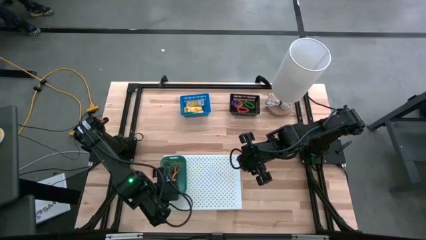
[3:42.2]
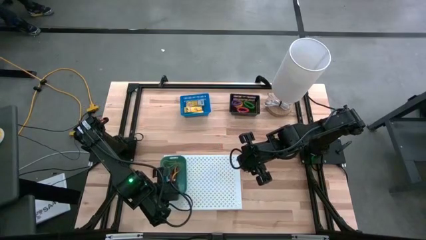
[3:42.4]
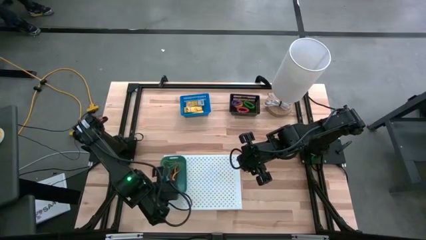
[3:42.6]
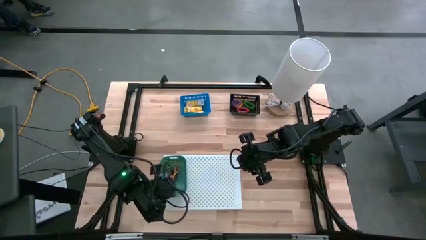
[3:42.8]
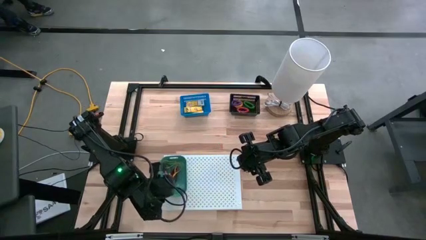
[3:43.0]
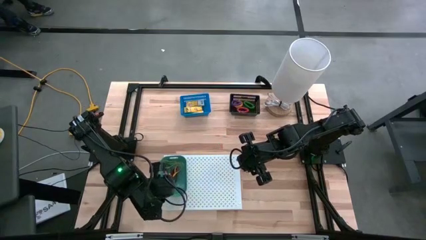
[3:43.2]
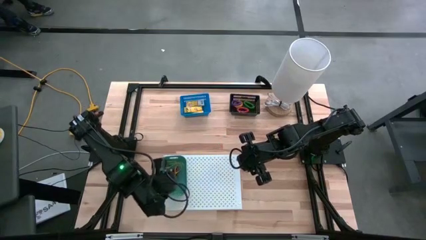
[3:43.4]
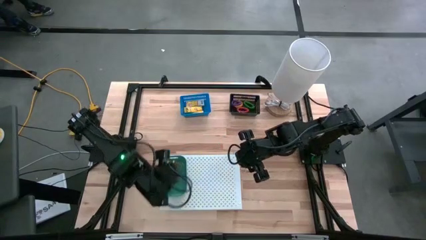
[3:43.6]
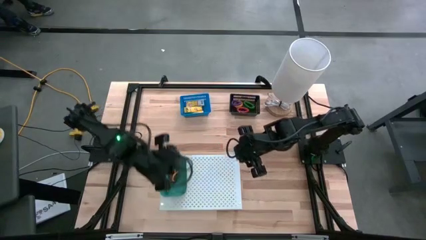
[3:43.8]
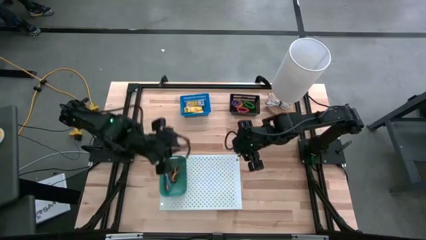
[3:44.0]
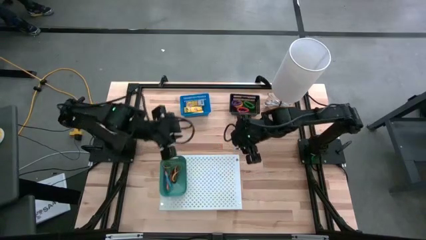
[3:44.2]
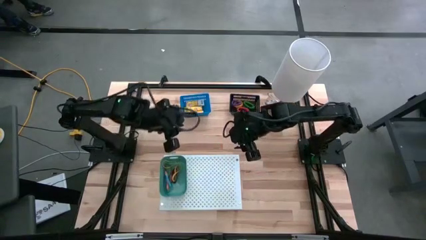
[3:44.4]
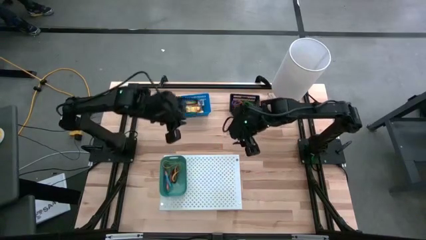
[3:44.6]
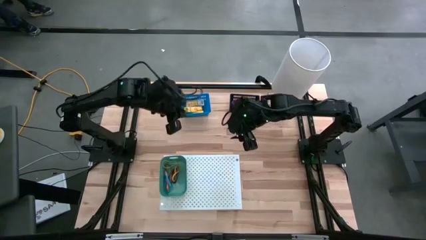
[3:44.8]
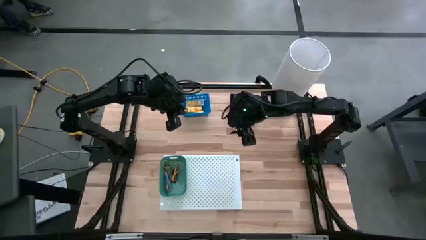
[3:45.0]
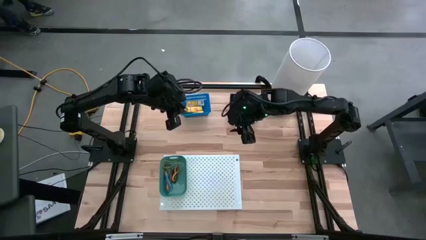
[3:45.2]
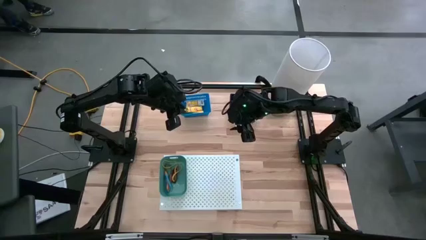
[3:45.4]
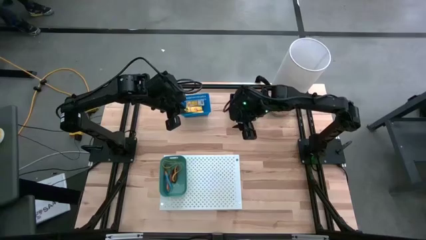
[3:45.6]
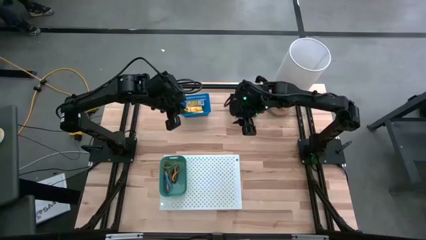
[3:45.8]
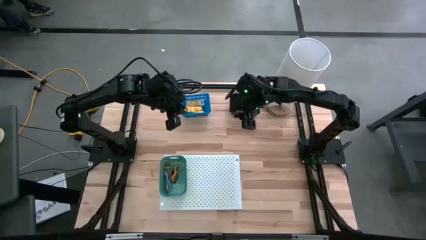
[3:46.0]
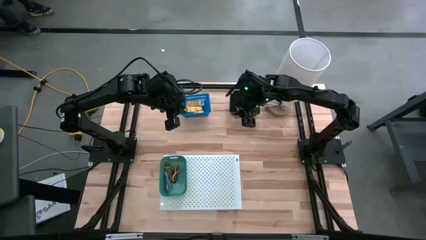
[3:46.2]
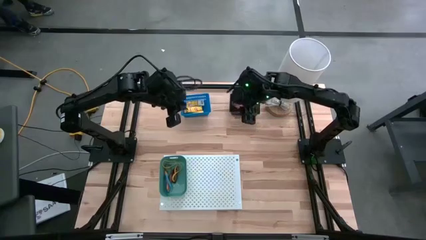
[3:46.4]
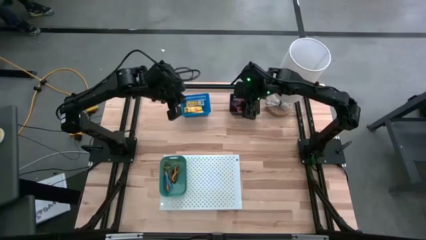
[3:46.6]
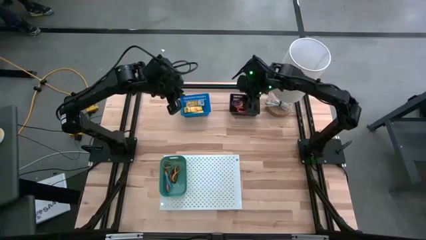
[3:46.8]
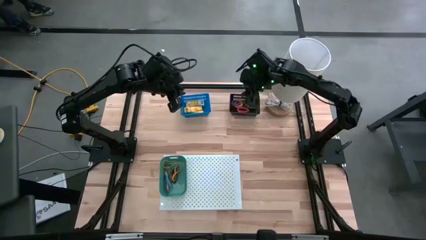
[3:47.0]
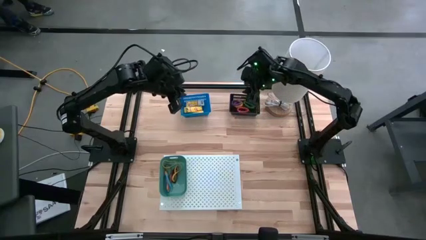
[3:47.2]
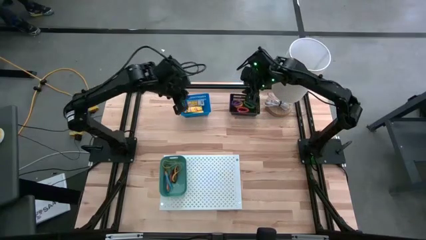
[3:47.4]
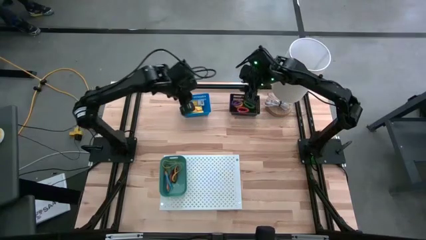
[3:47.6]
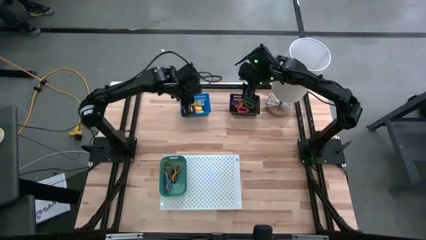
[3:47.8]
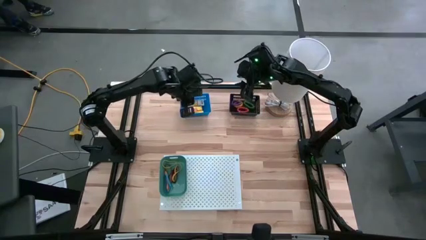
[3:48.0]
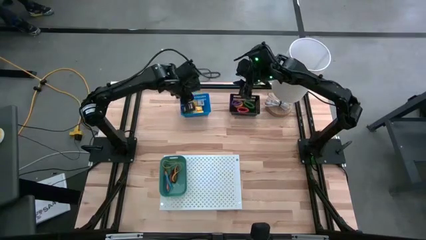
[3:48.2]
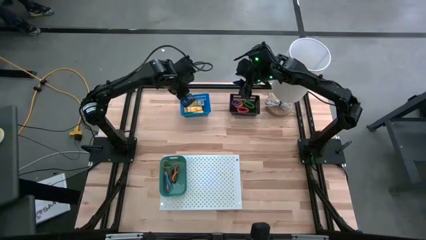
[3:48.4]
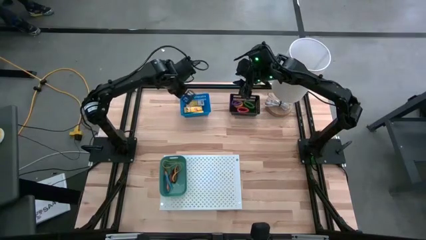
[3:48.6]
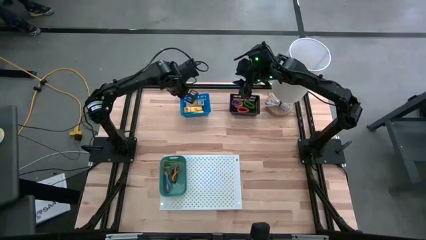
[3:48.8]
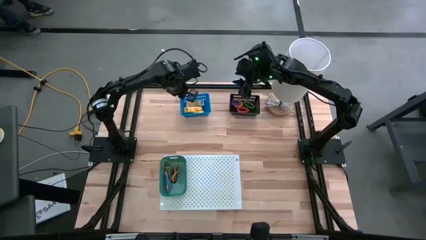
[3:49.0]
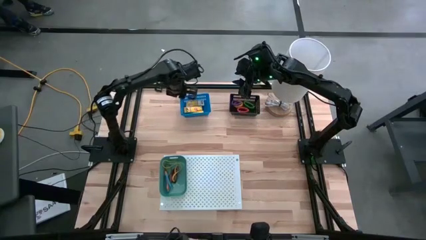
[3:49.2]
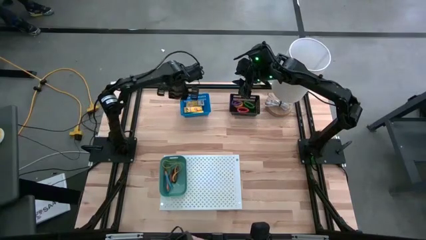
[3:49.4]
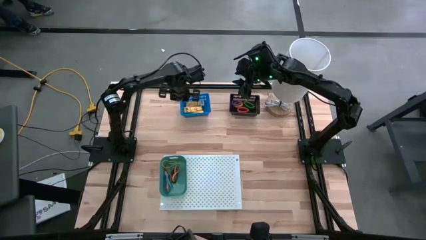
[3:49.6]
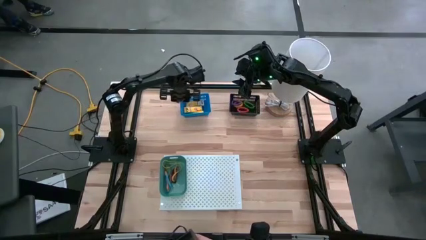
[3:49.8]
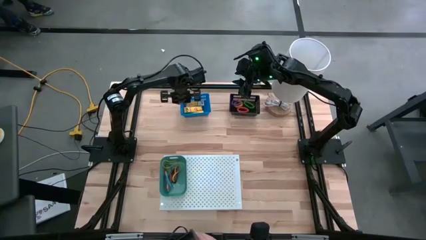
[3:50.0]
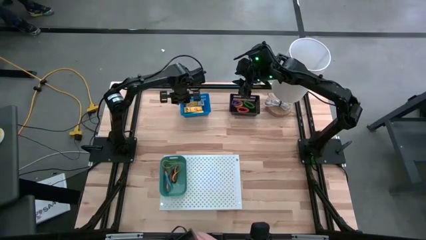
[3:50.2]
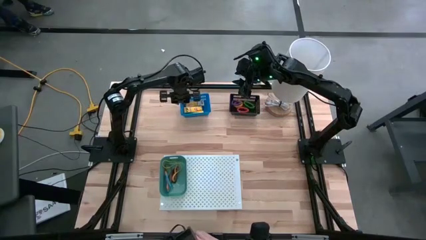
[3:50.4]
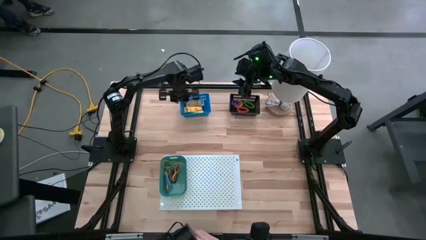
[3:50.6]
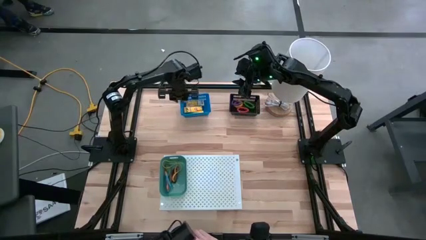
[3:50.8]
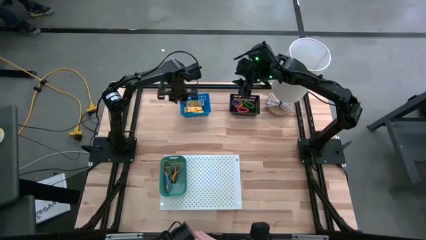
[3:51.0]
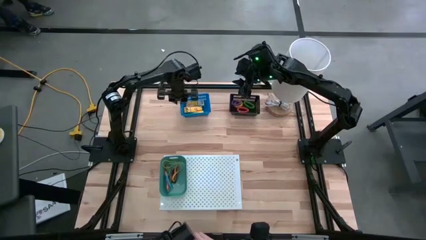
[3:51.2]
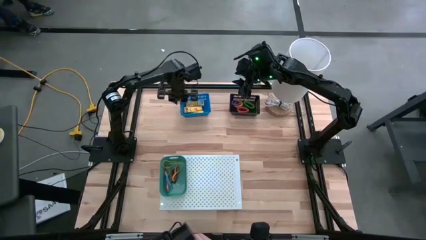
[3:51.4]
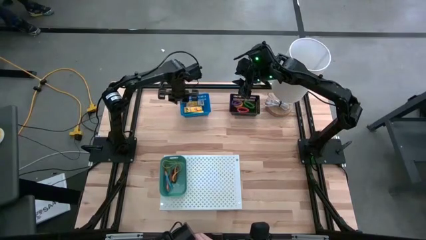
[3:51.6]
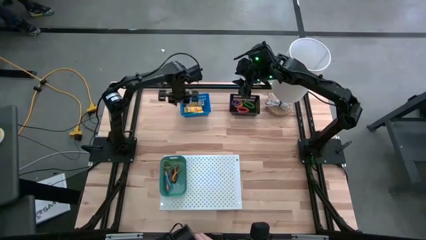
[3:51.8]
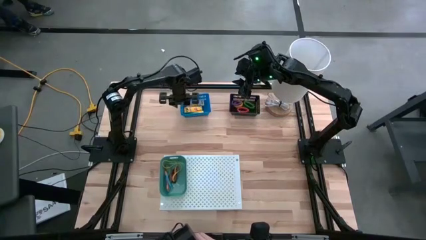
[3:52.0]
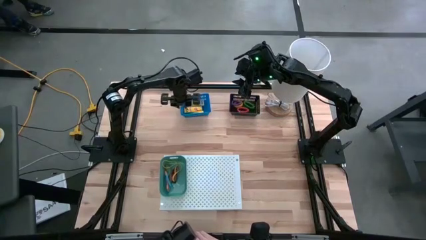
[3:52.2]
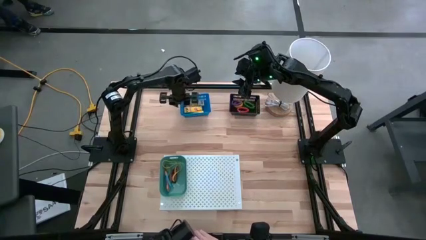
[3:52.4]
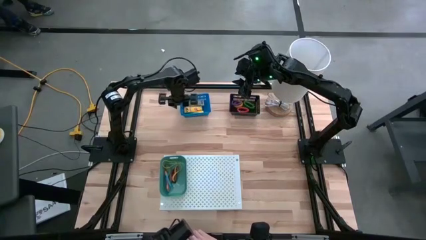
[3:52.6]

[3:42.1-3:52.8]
Task: Pick & Place Office Desk Supplies
Put the blue bin on the shelf
